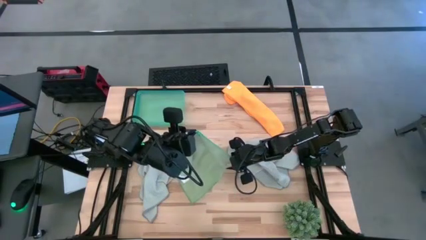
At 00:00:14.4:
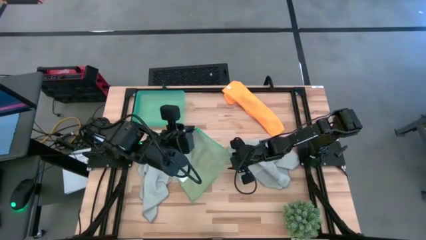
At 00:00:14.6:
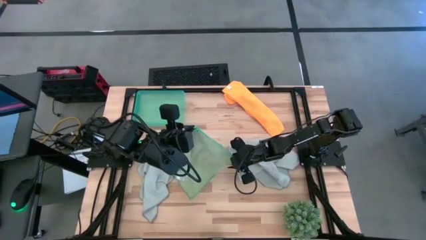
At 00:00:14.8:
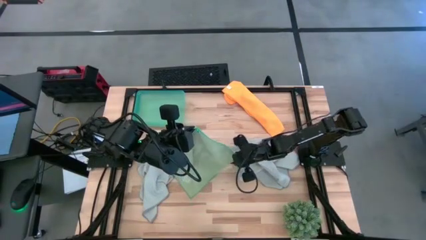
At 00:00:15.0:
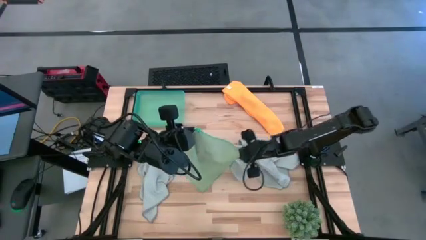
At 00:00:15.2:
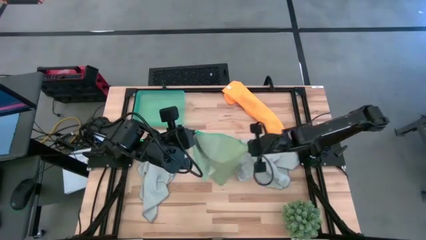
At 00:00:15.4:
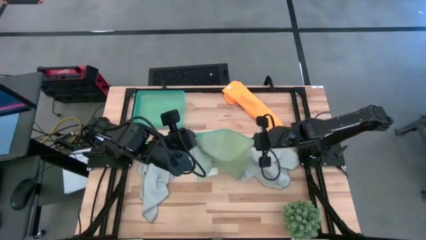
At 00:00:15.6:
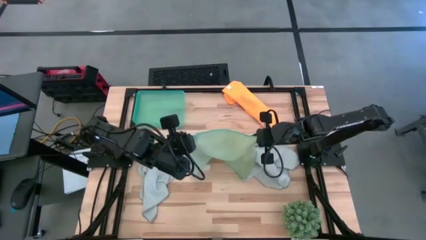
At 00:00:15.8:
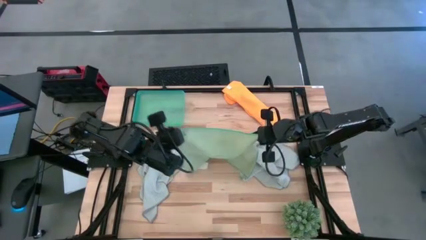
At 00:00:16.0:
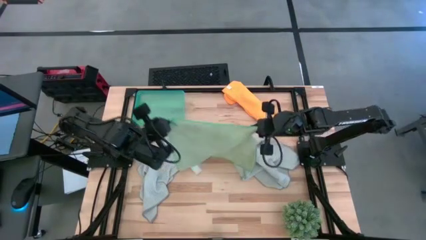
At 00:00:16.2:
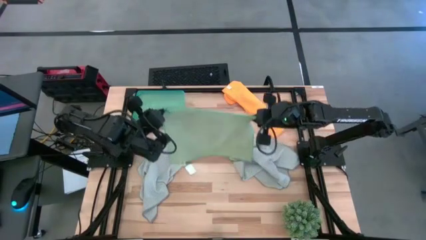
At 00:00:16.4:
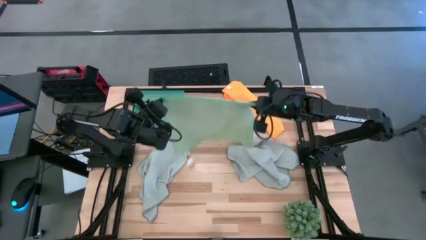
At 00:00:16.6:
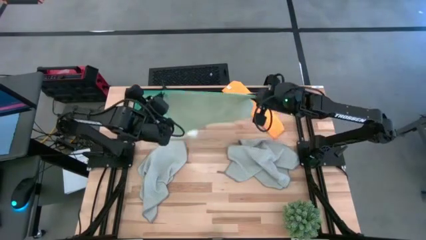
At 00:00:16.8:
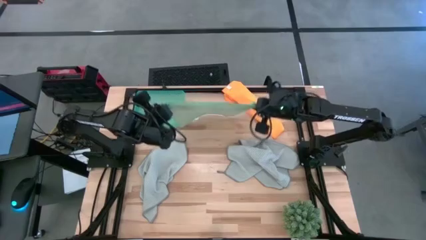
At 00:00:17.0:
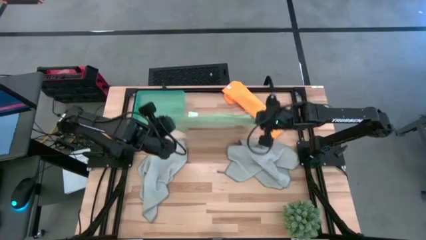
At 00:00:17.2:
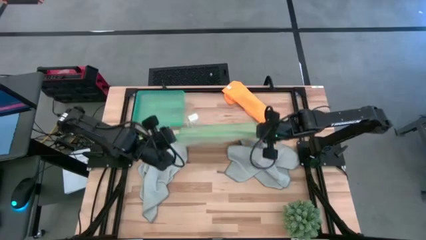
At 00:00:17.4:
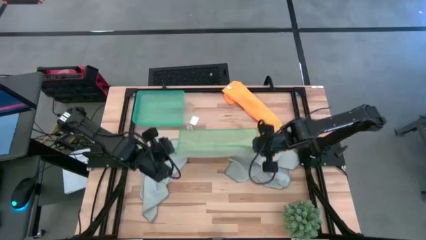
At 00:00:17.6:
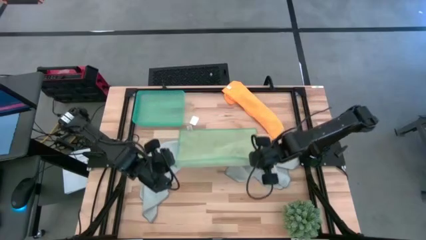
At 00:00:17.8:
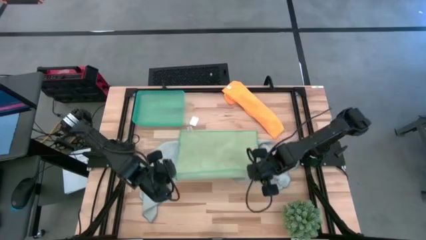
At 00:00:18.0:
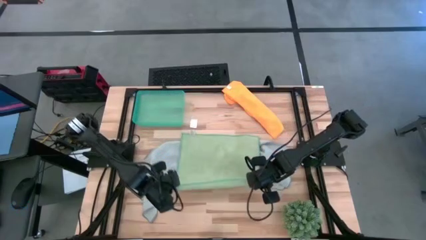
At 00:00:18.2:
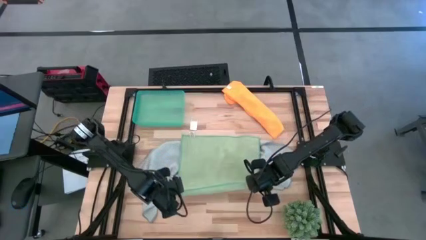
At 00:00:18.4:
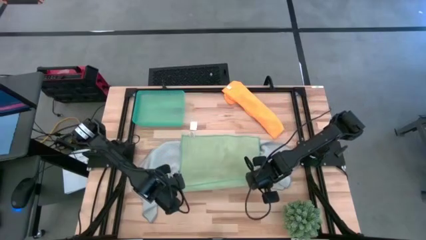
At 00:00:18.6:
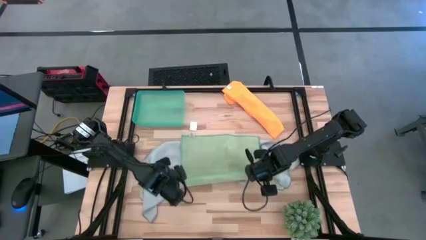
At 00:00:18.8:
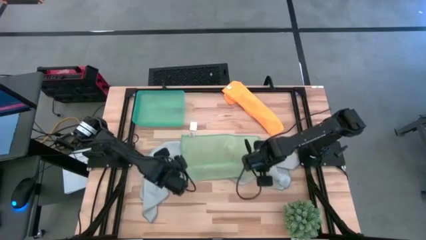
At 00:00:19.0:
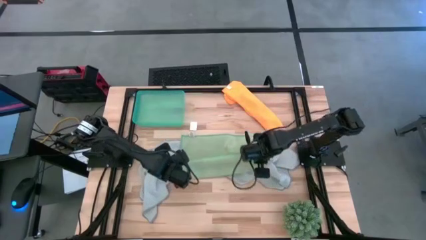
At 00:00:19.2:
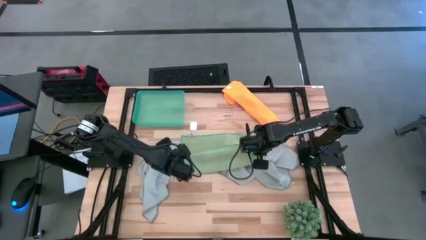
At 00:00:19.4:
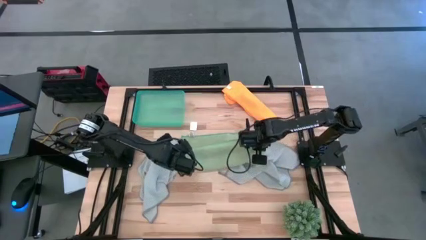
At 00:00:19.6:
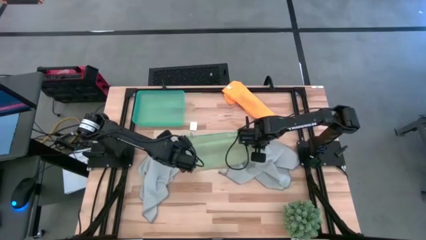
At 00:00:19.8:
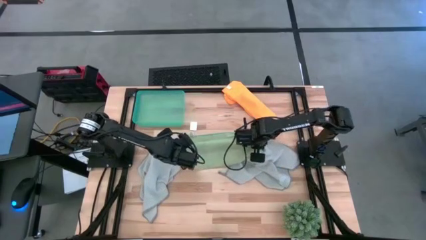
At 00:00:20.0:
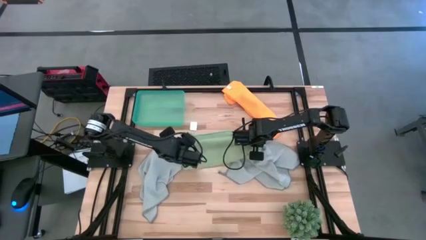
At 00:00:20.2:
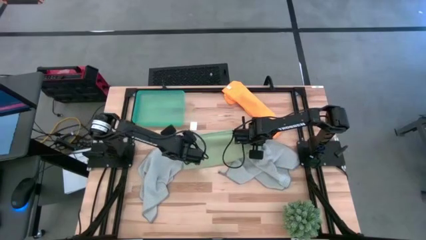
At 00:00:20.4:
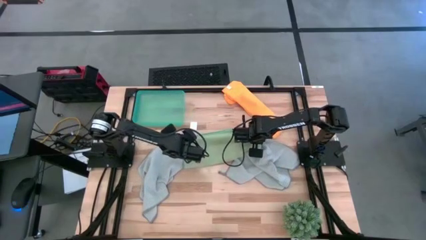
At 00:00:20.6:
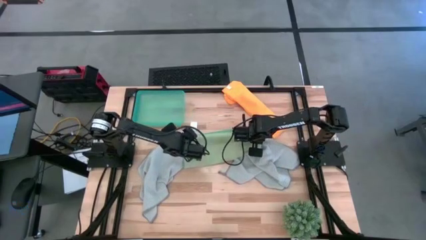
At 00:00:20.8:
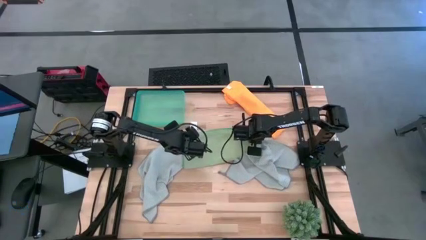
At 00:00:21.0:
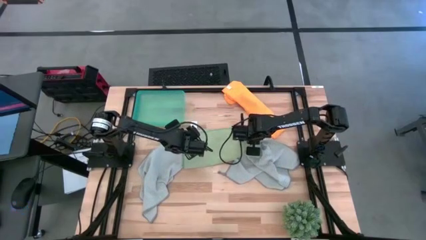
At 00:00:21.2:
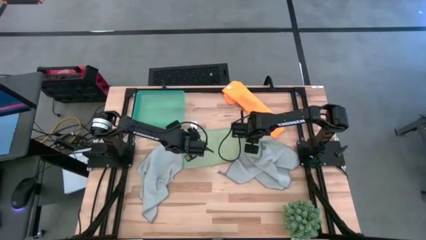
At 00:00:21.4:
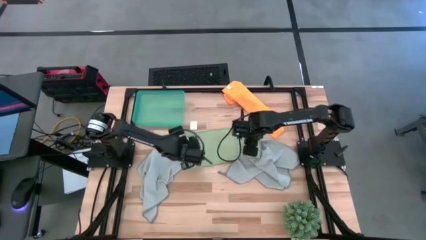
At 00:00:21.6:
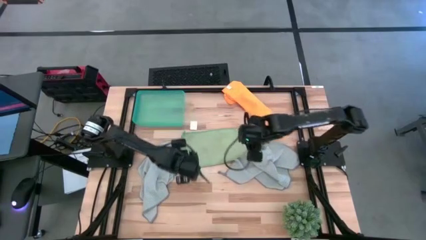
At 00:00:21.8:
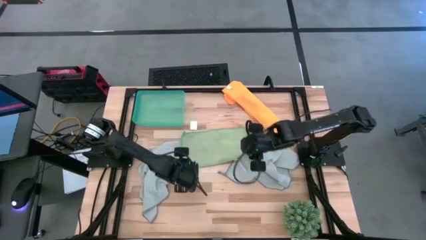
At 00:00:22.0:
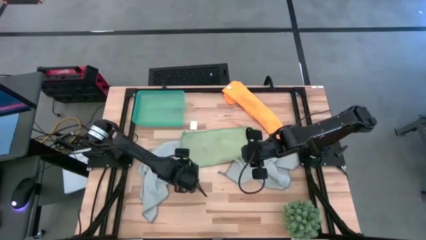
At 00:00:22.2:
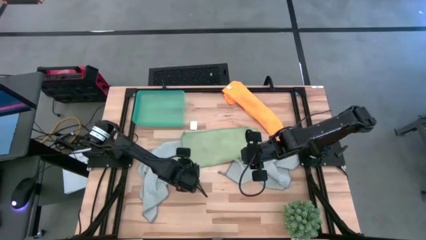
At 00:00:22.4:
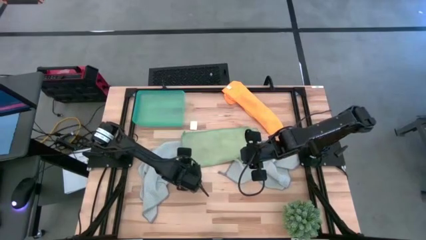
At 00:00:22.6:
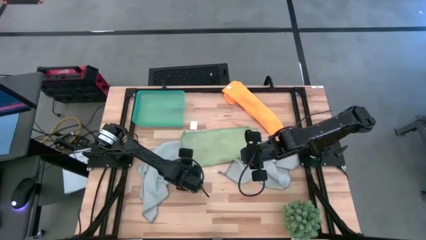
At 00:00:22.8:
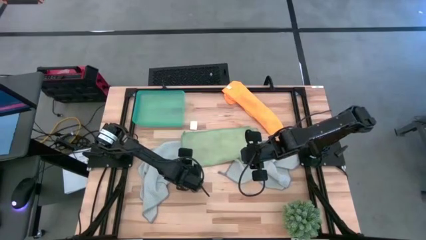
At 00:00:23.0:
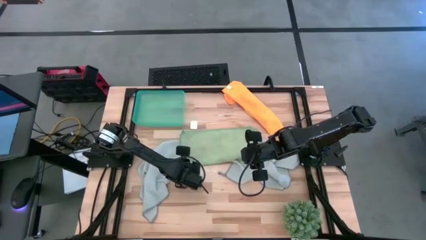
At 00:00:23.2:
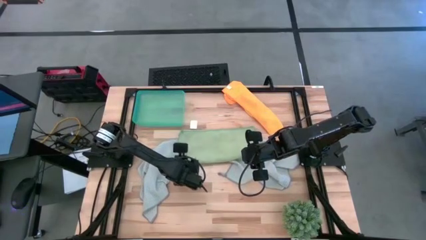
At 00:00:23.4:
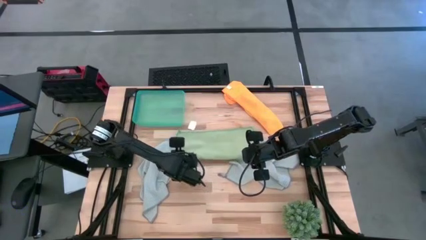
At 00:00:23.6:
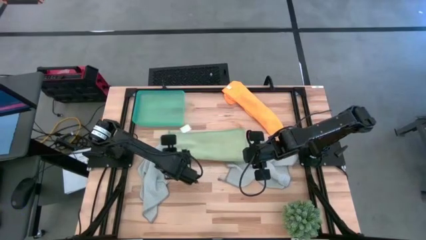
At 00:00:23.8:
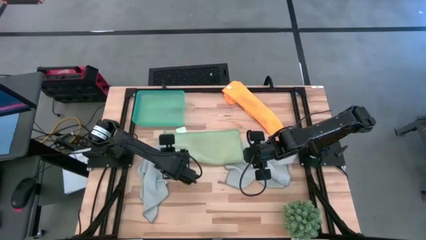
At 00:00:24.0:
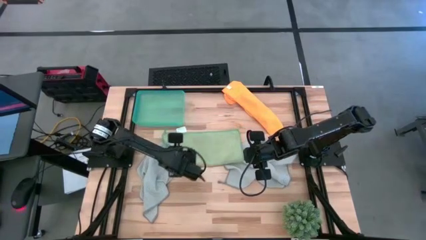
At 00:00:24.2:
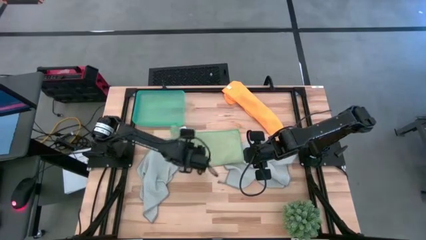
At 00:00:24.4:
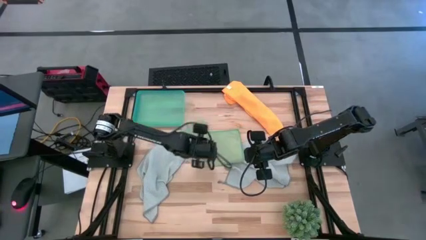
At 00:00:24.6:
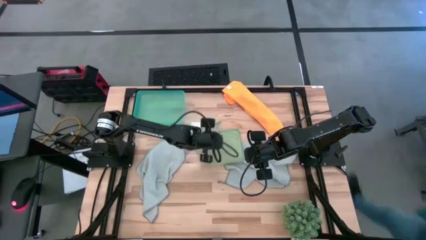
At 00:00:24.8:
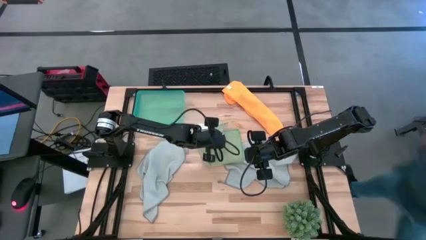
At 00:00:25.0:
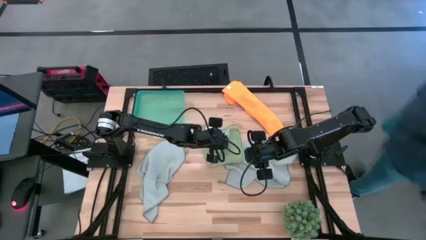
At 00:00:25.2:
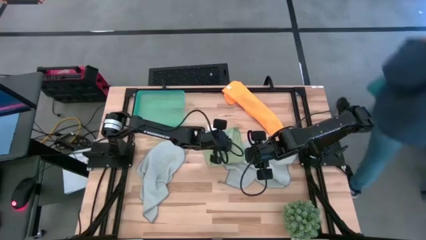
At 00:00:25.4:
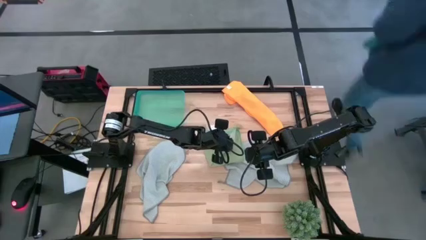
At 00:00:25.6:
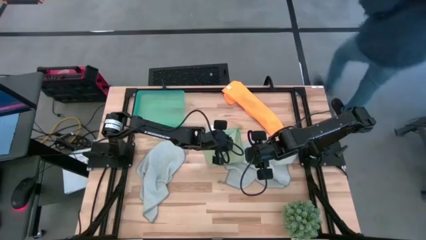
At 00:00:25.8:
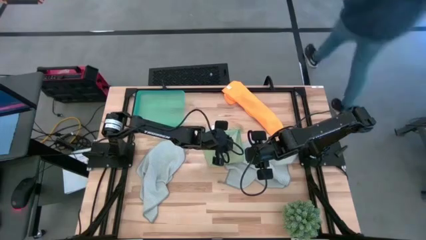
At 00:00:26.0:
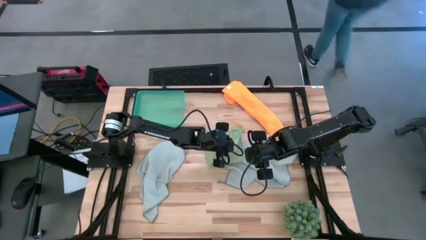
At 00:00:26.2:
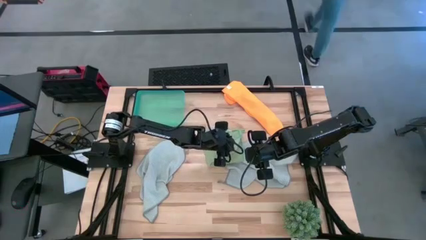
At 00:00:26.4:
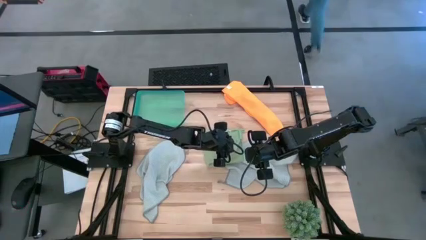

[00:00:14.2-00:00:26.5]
Task: Fold microfiber towels
Fold the green towel
